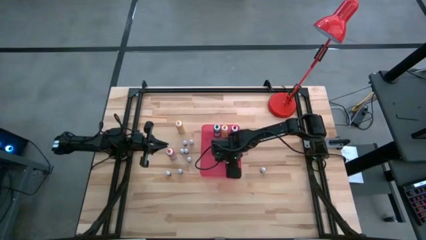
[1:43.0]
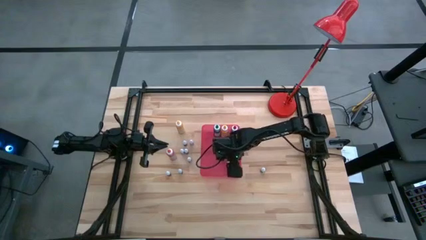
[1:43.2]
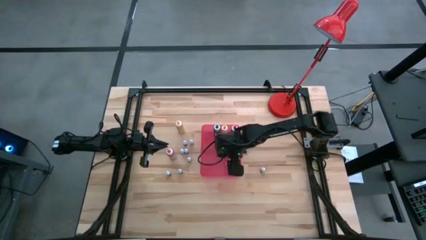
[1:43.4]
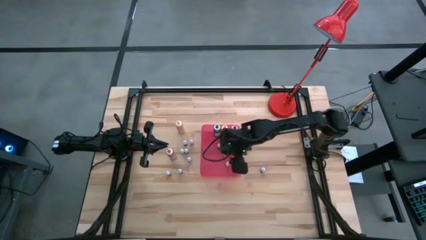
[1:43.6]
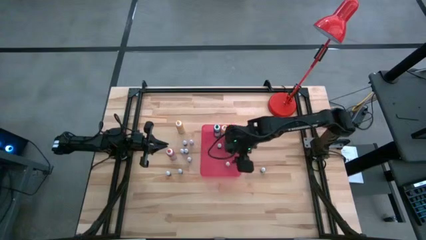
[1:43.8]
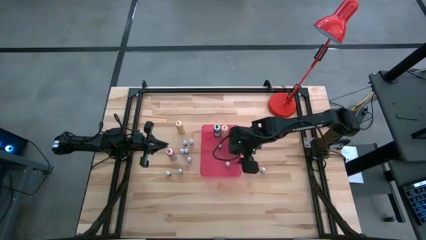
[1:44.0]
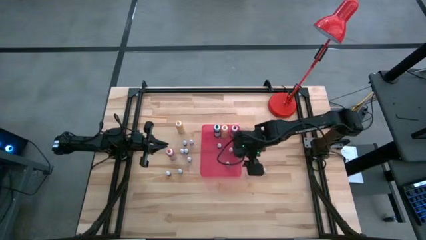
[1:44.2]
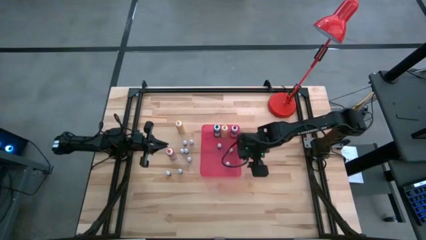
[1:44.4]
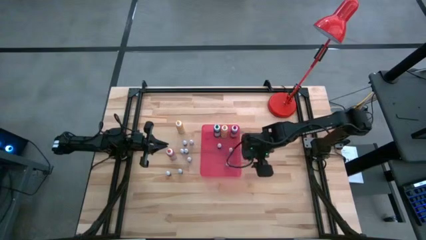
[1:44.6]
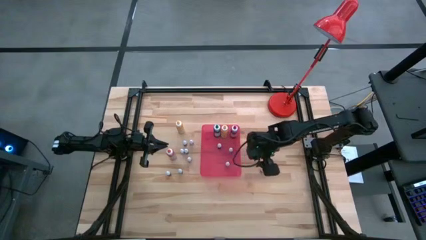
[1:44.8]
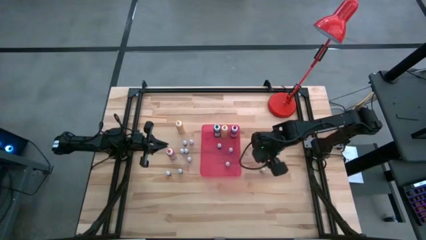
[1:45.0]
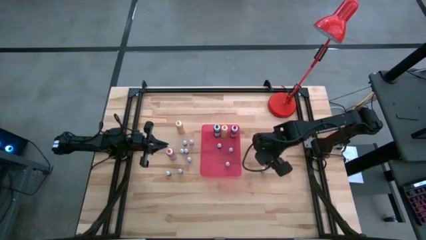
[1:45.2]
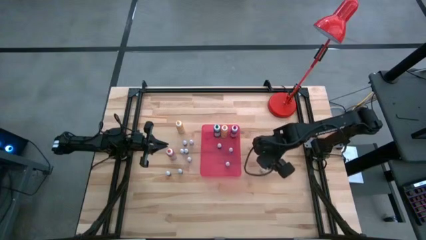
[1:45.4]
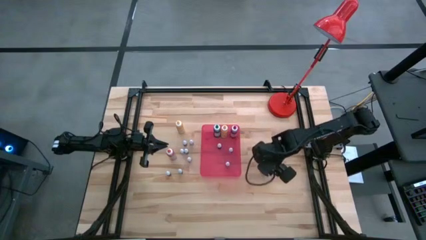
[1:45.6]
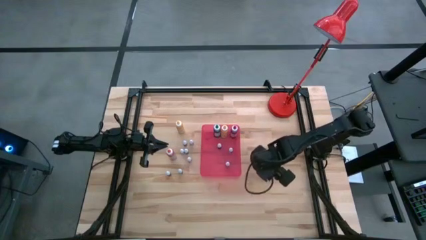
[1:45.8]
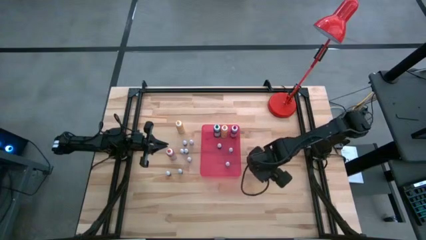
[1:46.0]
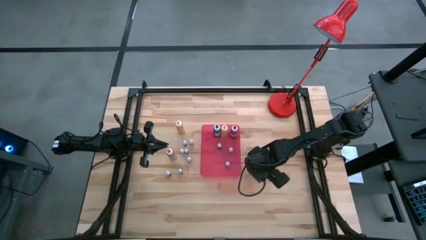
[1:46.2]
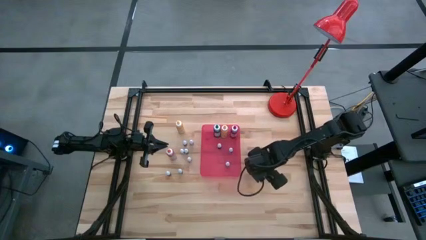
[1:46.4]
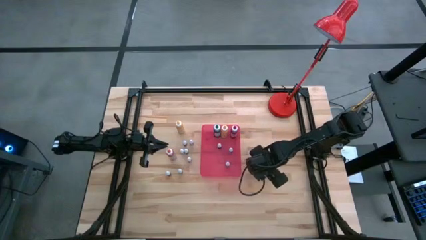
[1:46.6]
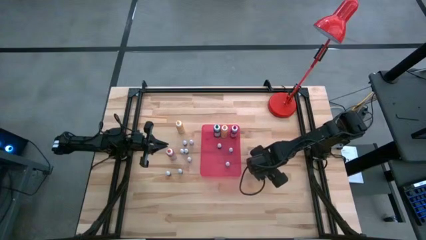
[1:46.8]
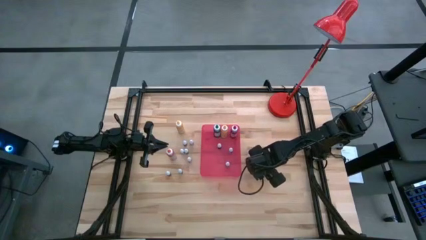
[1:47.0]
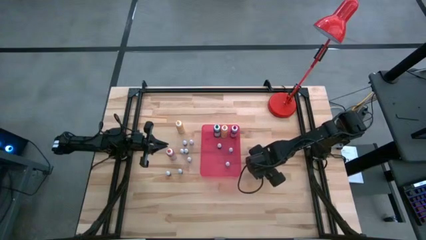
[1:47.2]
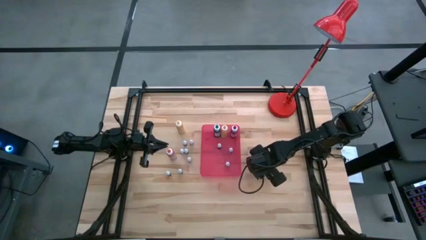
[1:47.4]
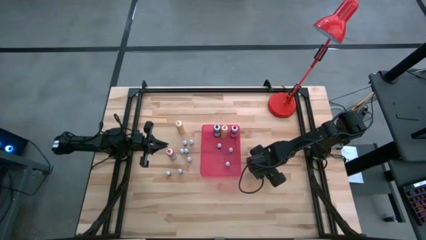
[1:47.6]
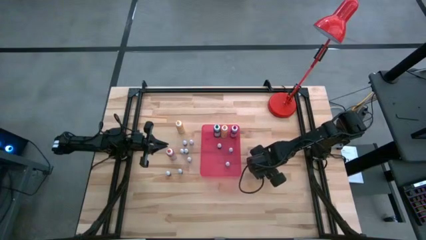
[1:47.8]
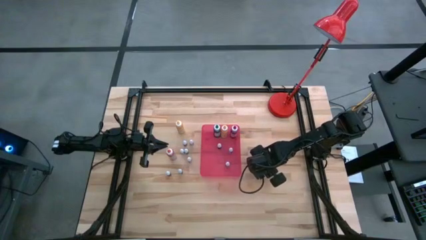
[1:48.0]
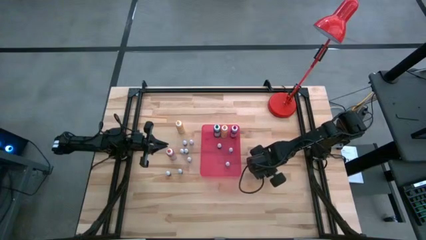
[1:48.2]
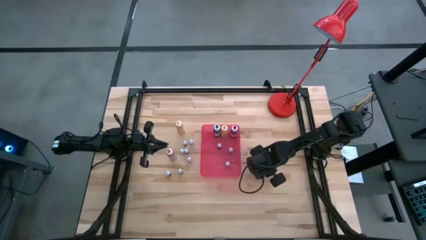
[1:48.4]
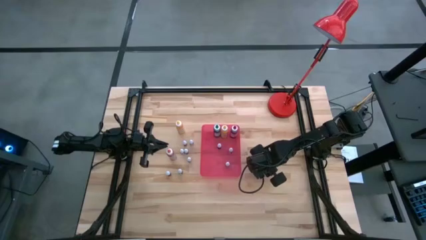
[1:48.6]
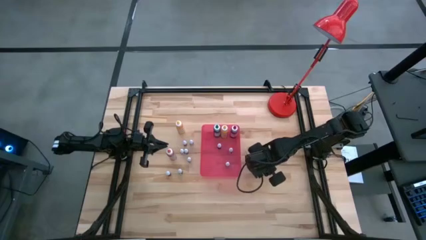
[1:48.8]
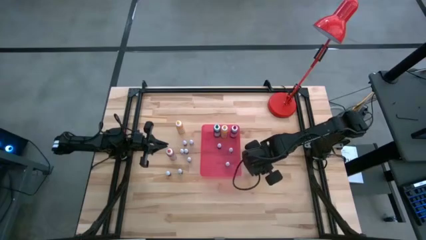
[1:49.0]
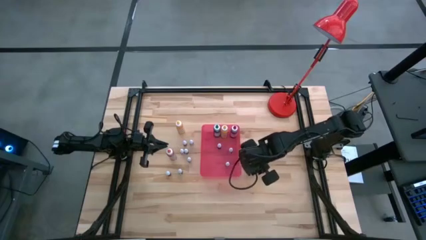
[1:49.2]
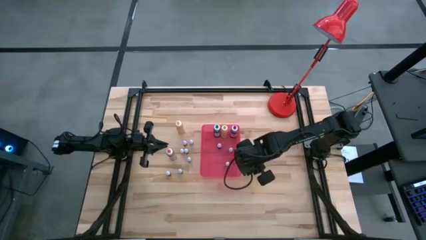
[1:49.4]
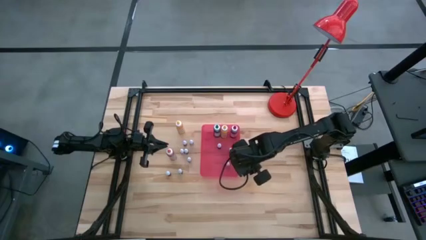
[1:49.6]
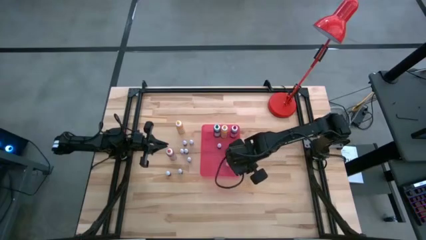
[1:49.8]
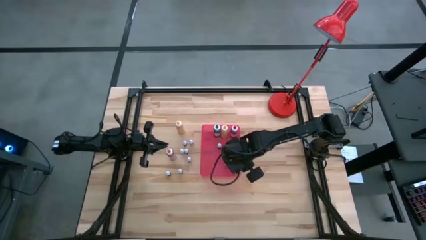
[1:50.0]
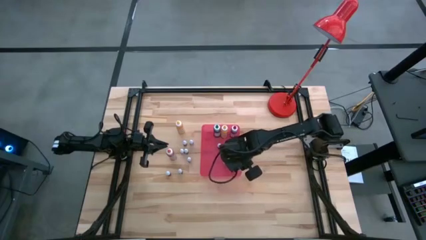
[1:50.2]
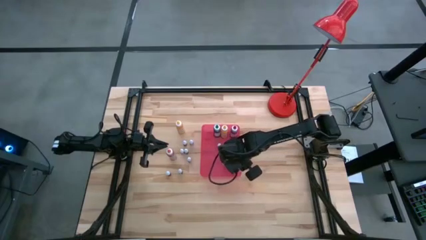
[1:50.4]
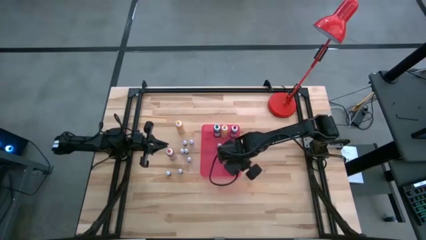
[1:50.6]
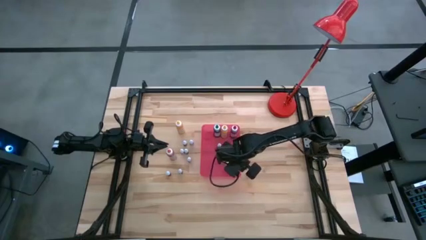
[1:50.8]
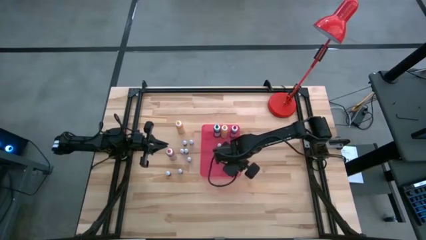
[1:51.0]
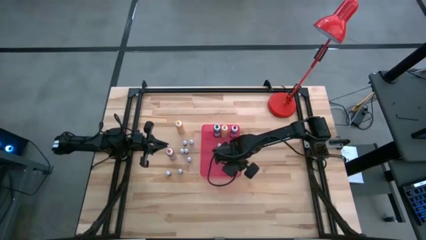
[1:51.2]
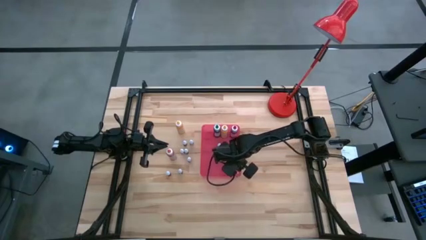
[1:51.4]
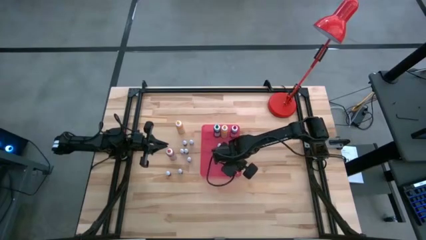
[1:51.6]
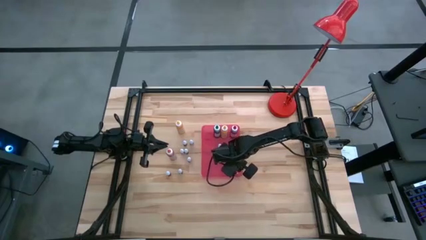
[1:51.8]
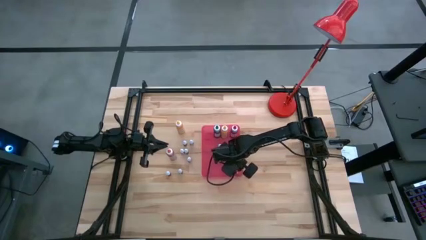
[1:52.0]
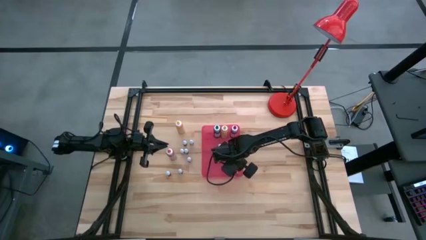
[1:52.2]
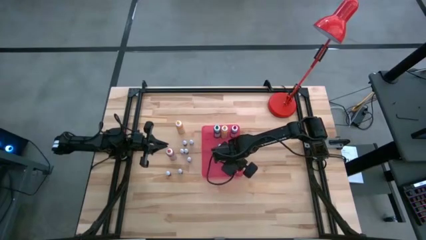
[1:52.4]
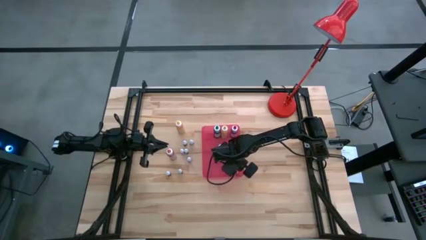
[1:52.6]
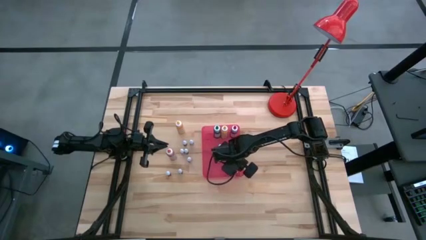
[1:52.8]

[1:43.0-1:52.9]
Task: Pick & Place food coloring
Put the small food coloring bottle into the red bin

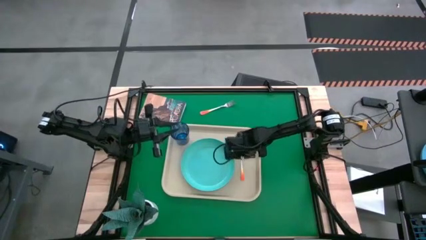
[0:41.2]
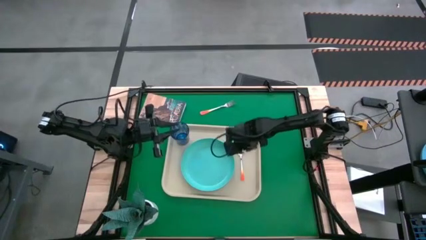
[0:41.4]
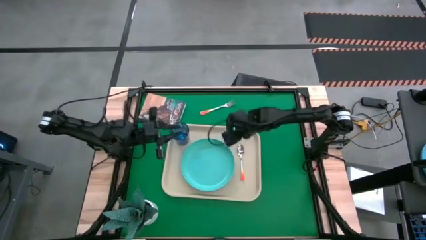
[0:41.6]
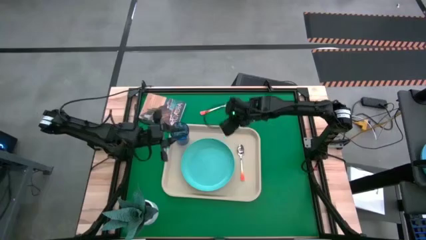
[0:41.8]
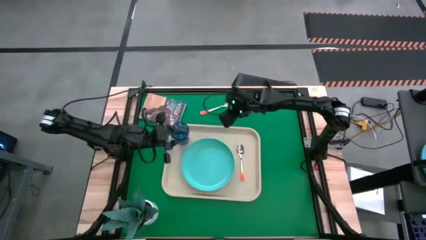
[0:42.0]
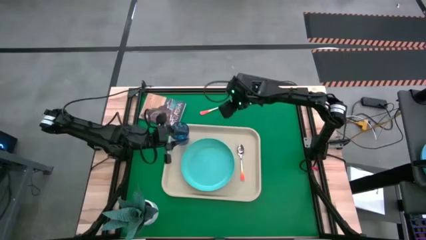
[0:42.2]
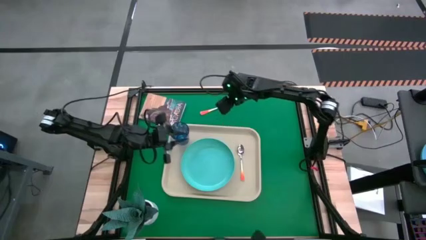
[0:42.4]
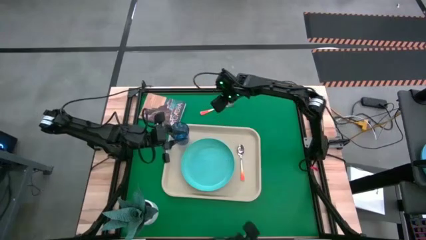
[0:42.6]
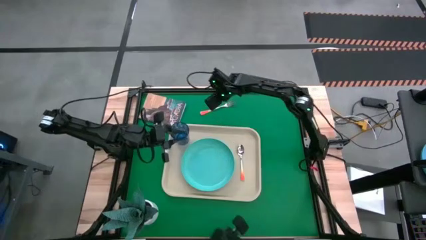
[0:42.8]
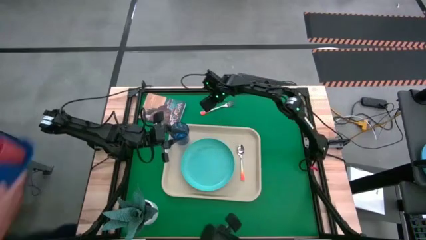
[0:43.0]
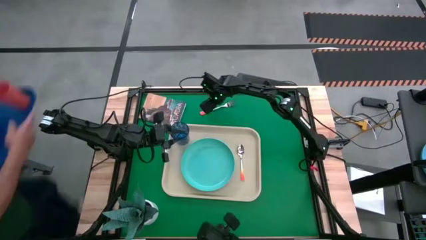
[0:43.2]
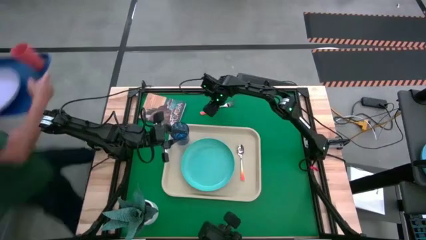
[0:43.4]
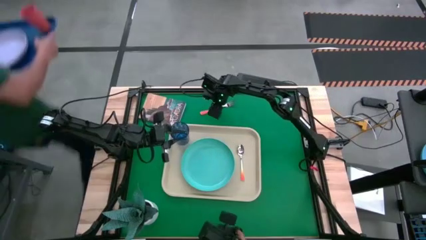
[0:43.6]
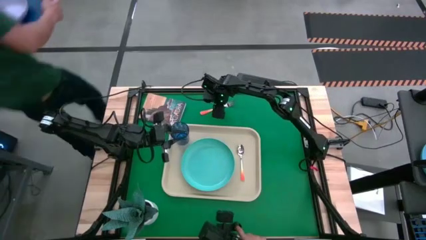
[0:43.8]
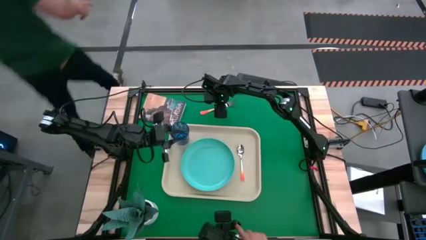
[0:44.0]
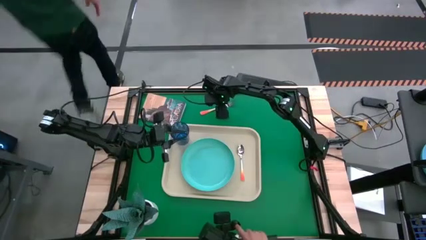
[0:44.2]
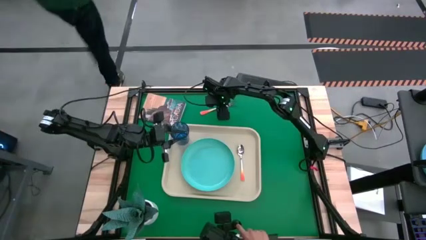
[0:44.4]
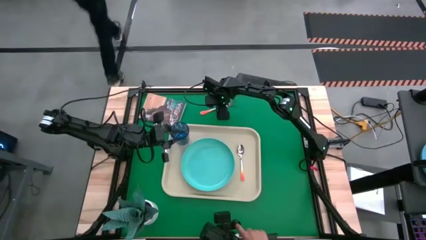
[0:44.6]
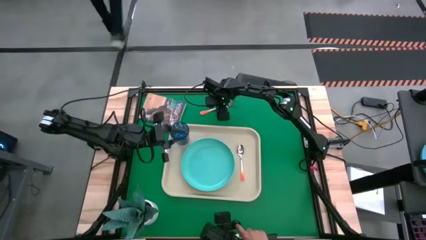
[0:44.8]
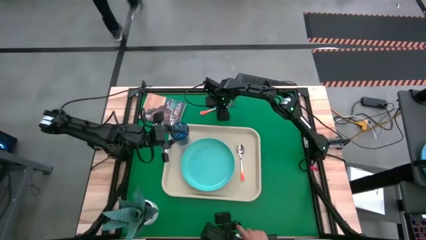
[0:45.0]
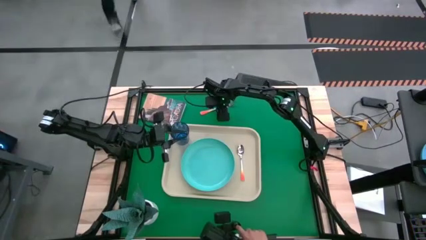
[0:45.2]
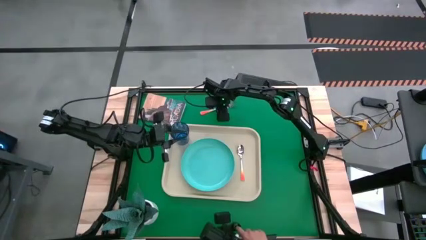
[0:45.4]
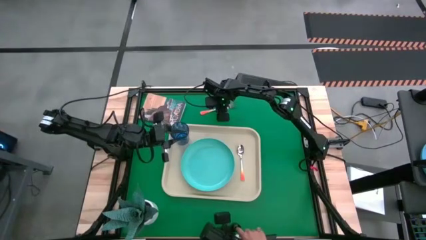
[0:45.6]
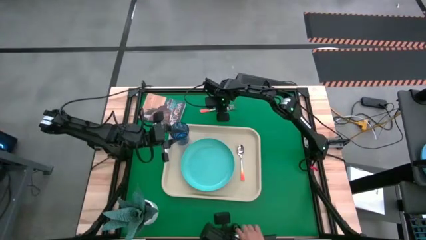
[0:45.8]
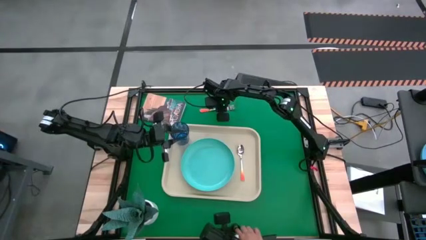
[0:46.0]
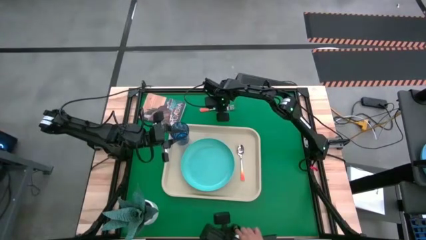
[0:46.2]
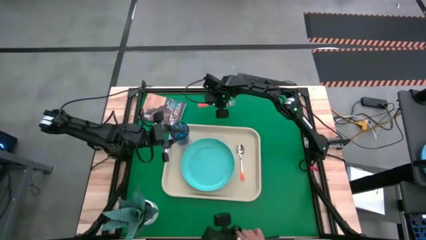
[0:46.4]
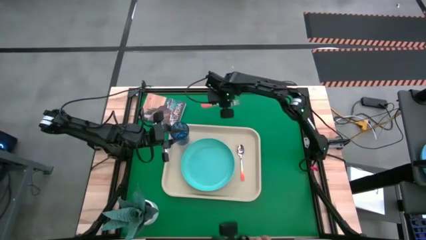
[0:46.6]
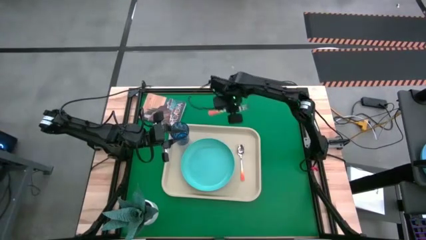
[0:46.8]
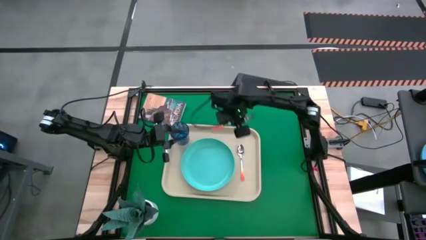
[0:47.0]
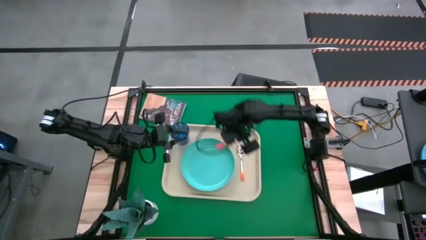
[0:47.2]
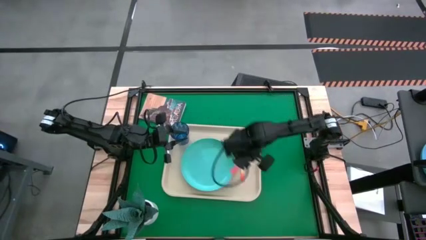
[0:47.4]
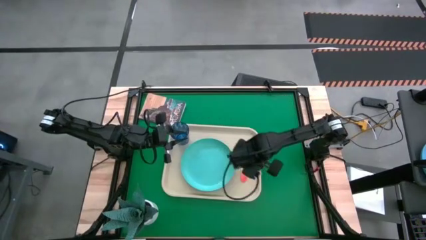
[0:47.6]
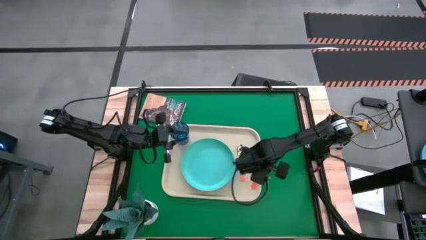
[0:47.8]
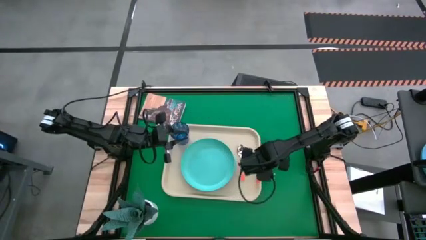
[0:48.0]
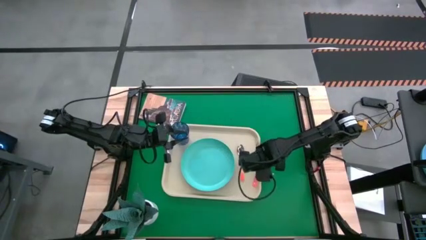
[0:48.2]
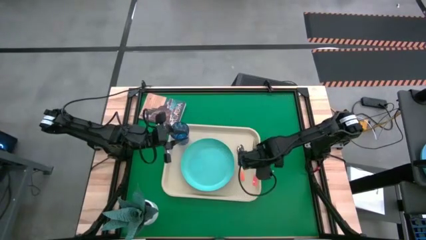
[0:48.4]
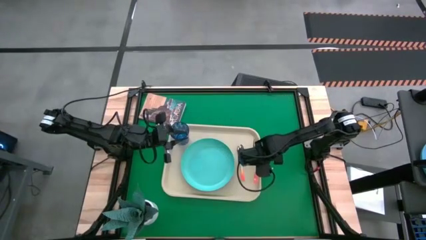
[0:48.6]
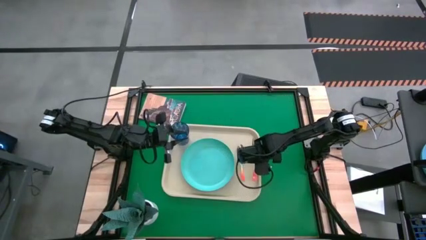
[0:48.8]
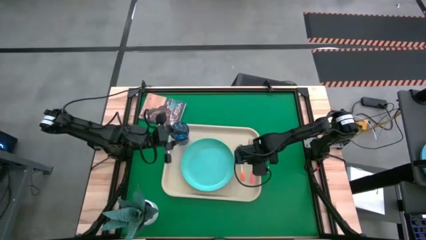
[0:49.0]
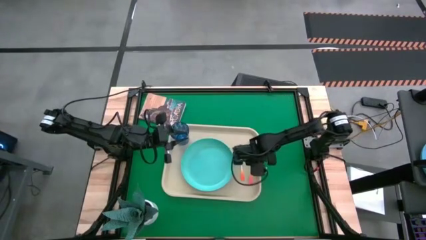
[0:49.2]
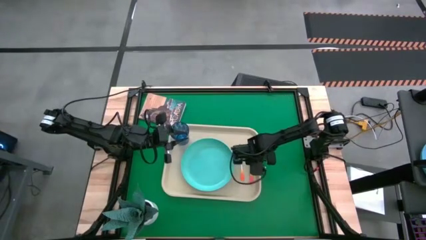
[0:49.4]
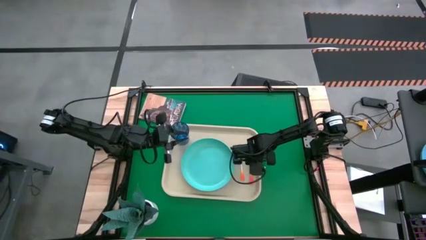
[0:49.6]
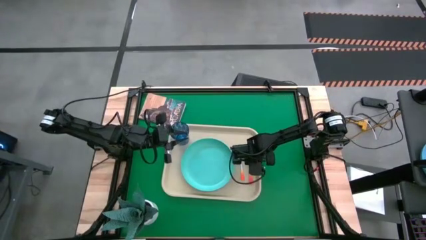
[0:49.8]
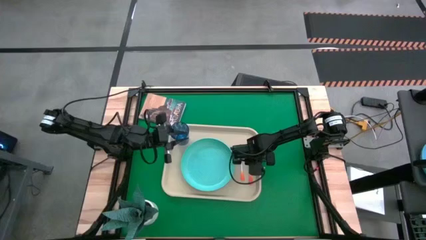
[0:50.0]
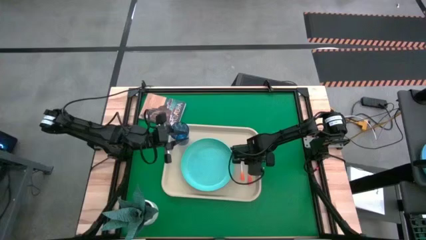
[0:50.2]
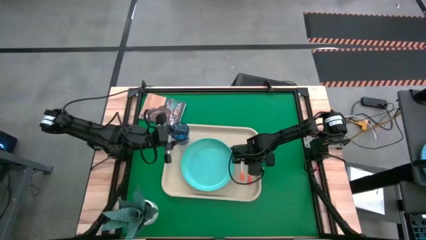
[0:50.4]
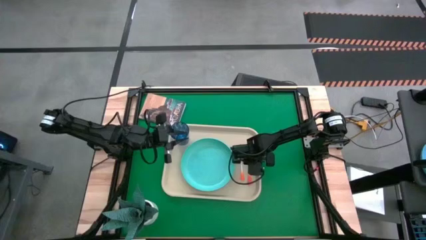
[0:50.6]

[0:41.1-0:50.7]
Task: Pick and place plate/cup/fork/spoon on tray
Put the orange fork on the white tray to the right of the orange spoon
